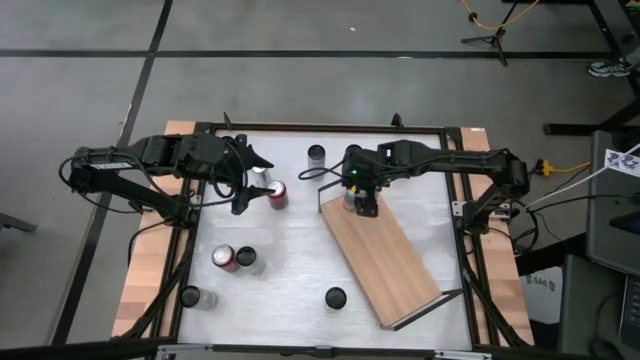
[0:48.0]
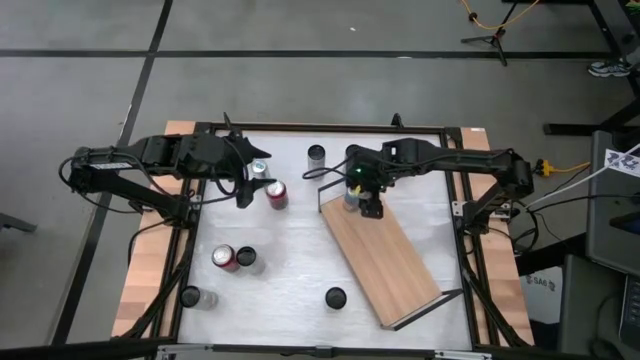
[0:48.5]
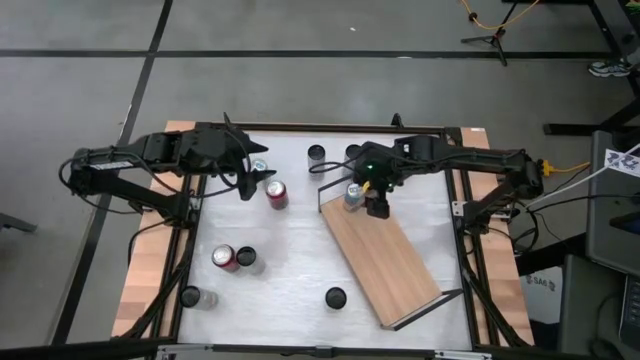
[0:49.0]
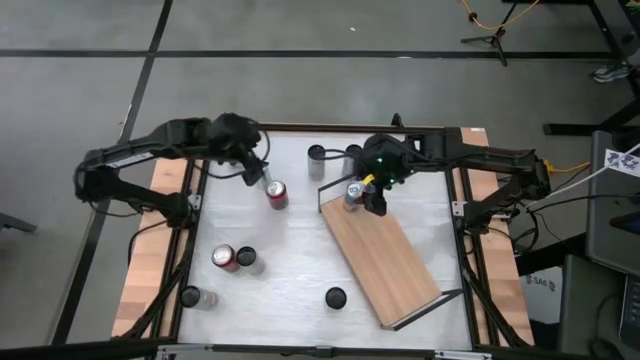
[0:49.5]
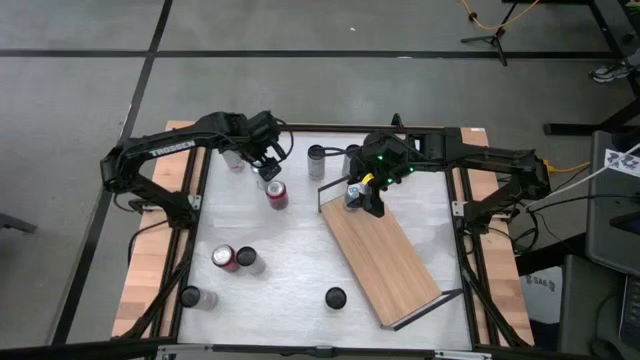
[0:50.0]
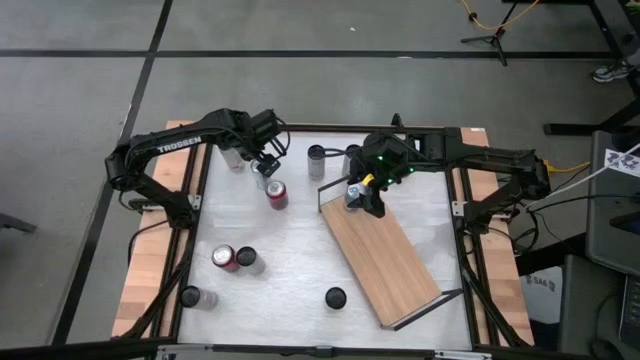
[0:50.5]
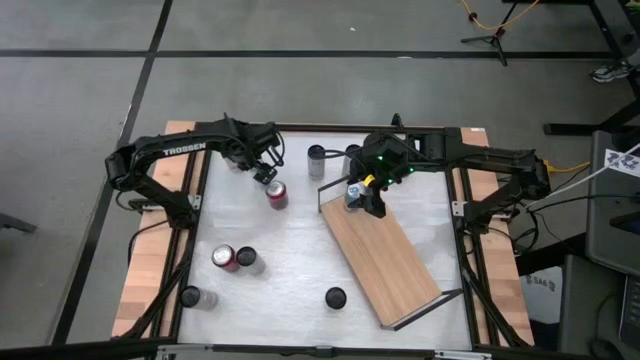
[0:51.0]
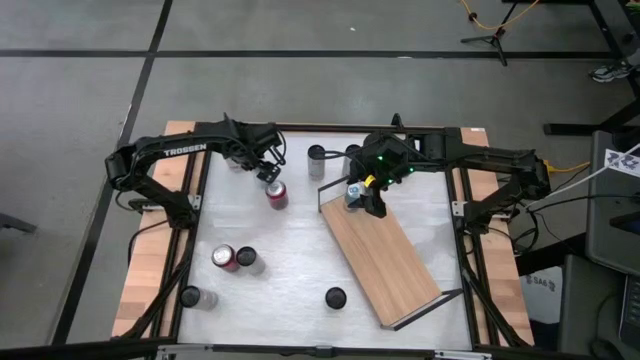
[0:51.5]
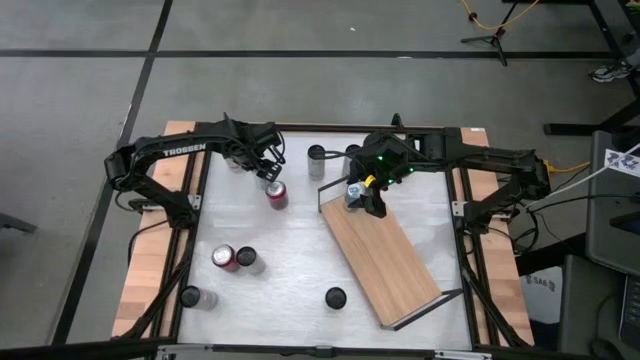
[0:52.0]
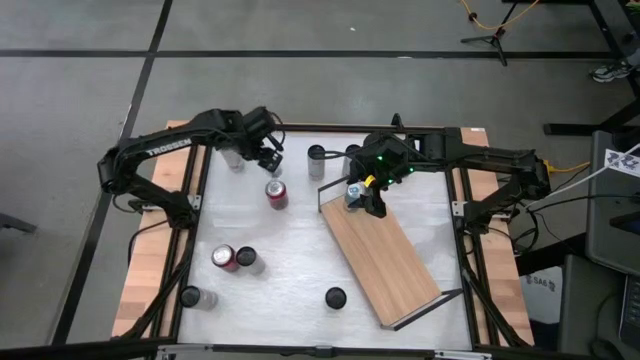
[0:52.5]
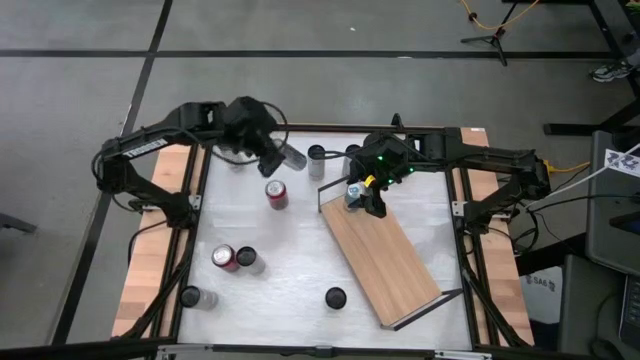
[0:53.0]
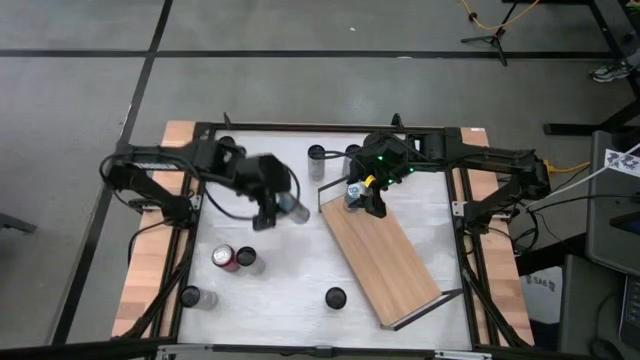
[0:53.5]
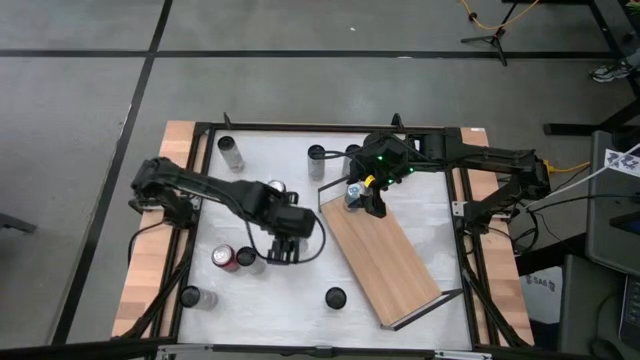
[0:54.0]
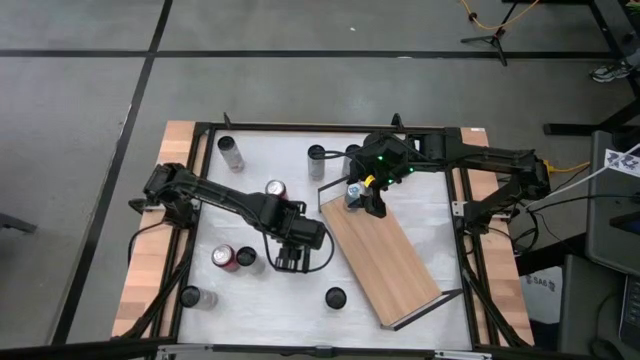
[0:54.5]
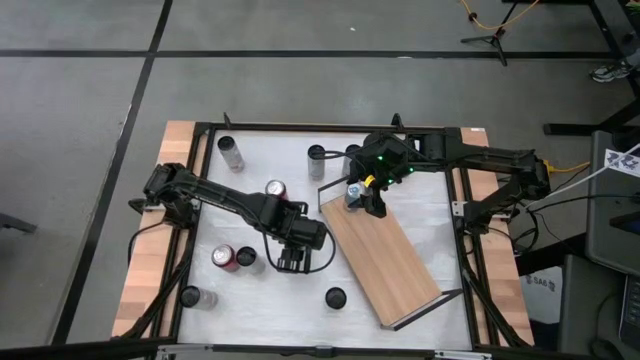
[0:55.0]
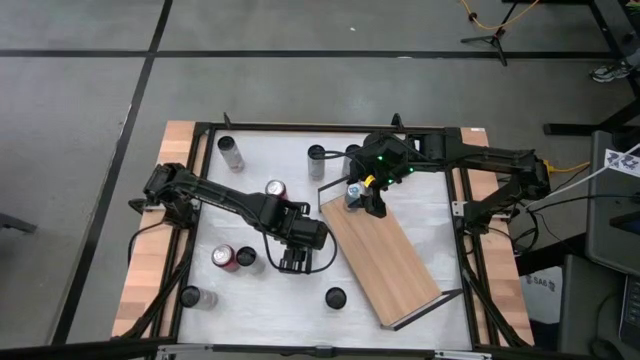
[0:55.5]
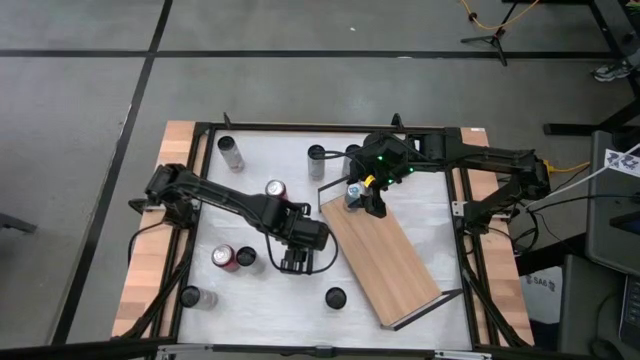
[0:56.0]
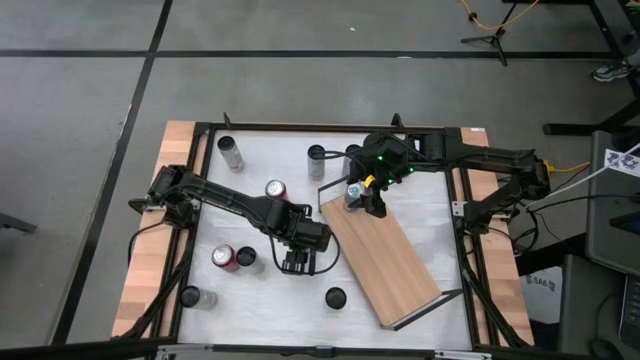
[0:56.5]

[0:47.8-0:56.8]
Task: Place canned beverage on shelf
Put the blue soda can on the shelf aligned with the other blue soda cans

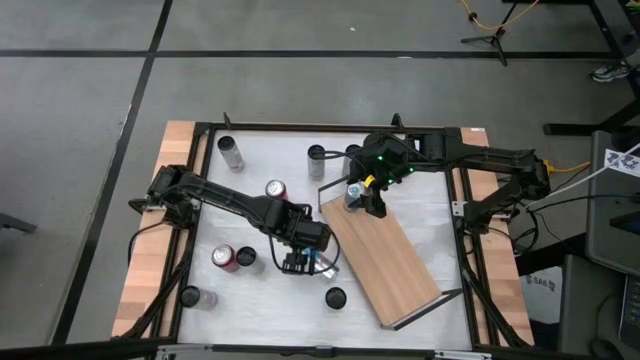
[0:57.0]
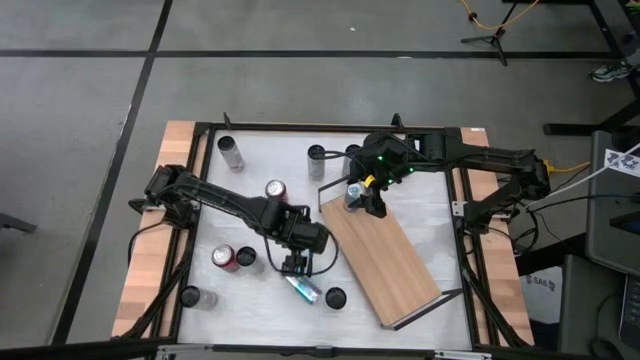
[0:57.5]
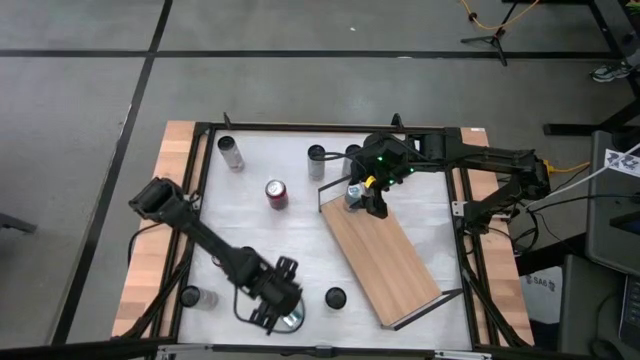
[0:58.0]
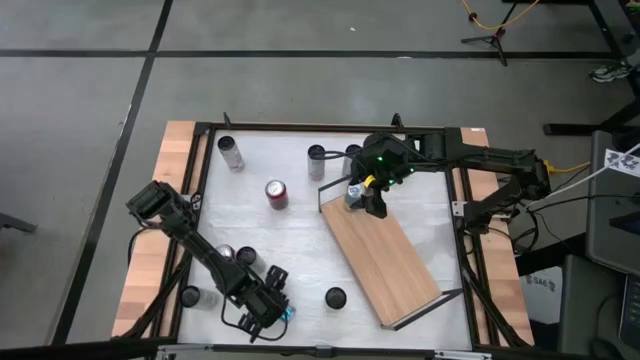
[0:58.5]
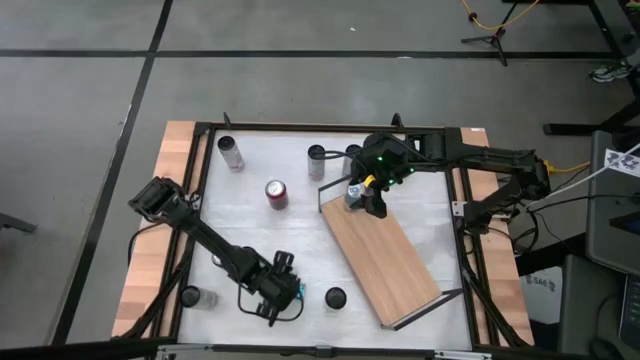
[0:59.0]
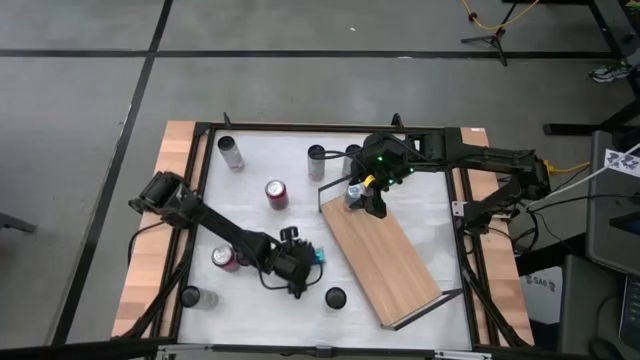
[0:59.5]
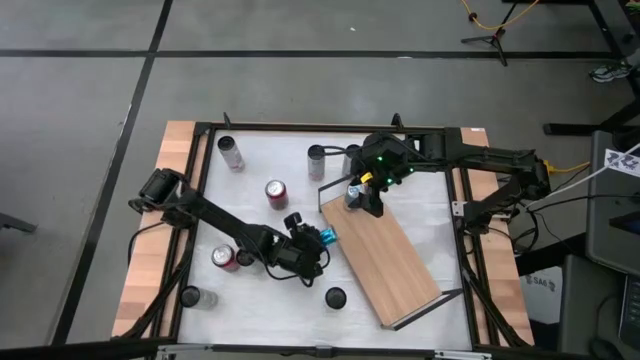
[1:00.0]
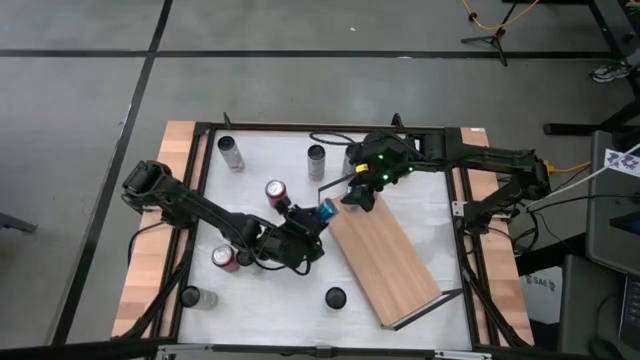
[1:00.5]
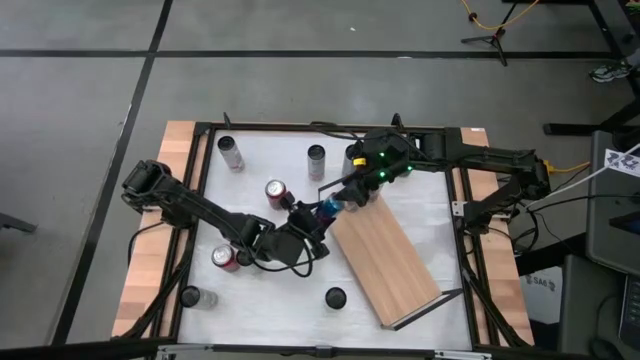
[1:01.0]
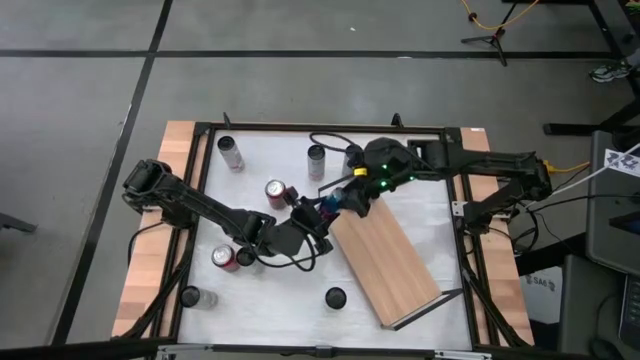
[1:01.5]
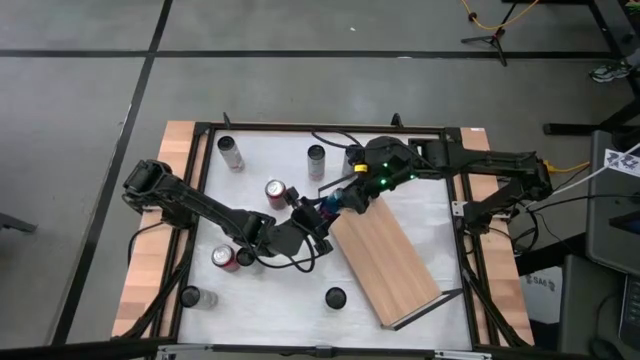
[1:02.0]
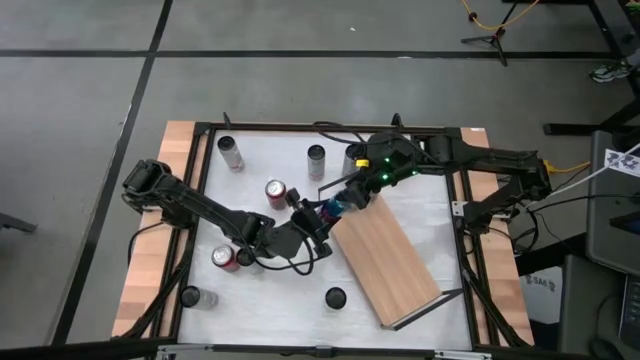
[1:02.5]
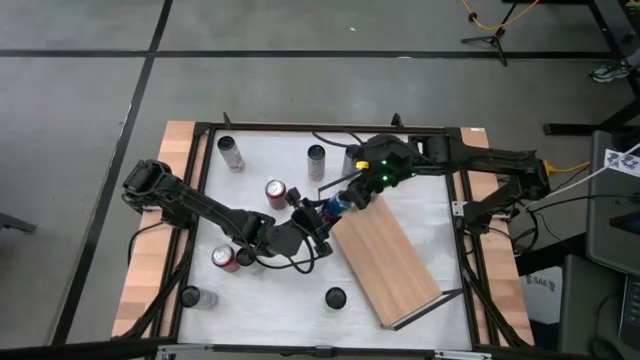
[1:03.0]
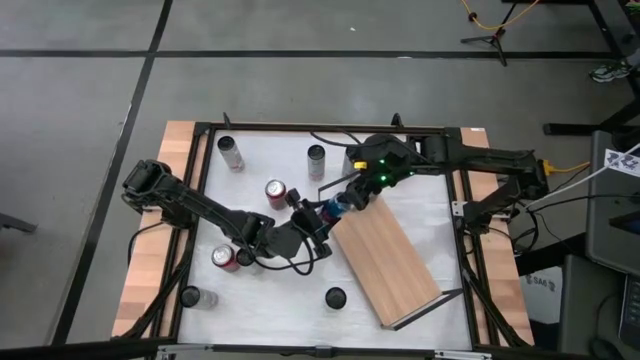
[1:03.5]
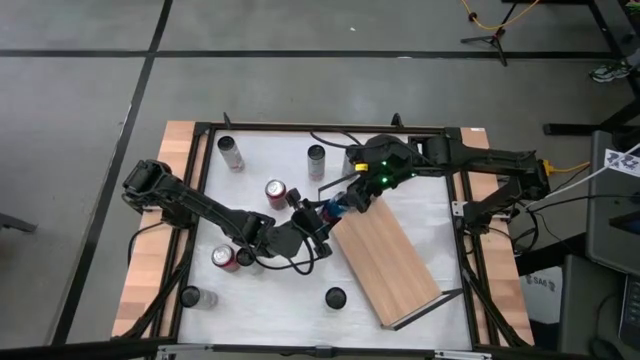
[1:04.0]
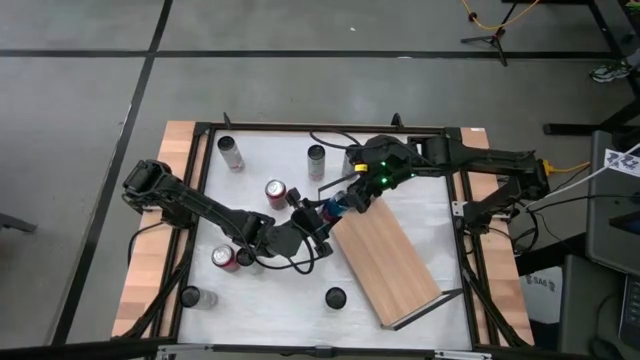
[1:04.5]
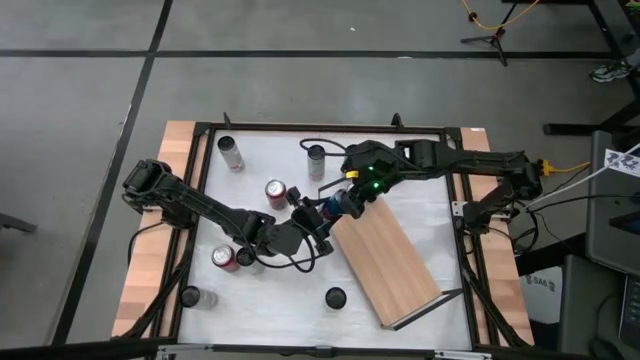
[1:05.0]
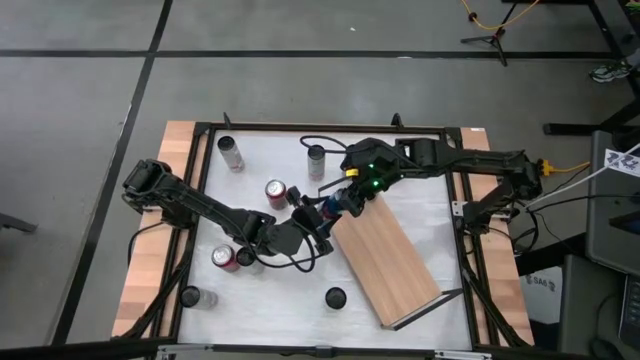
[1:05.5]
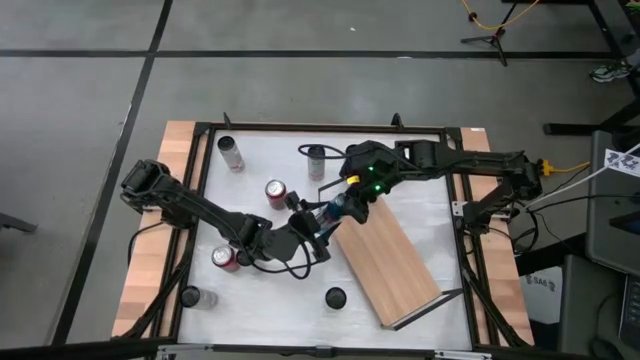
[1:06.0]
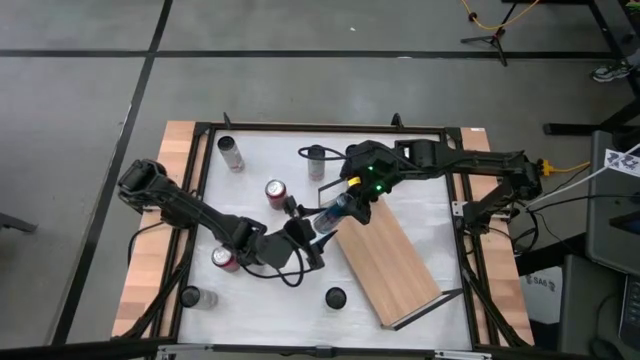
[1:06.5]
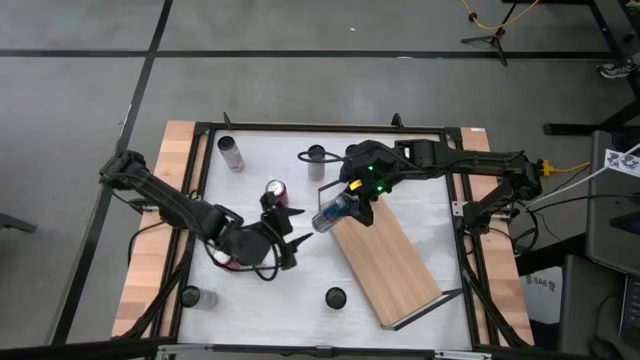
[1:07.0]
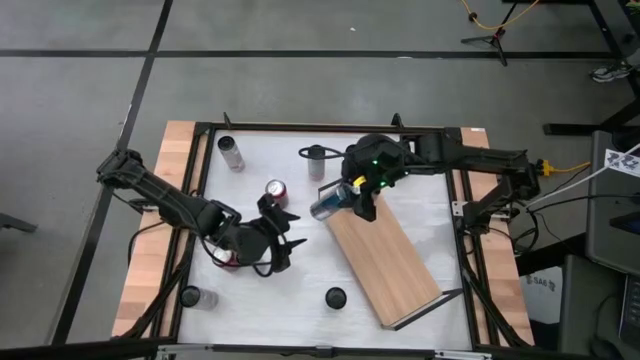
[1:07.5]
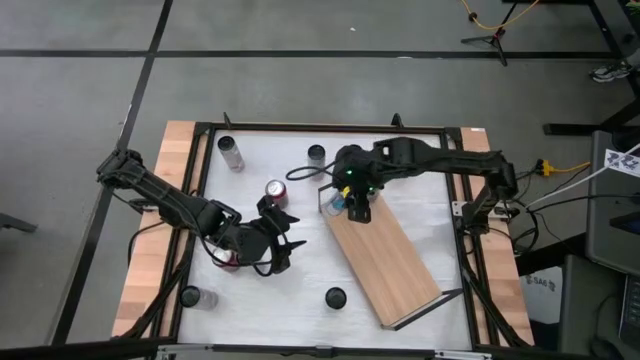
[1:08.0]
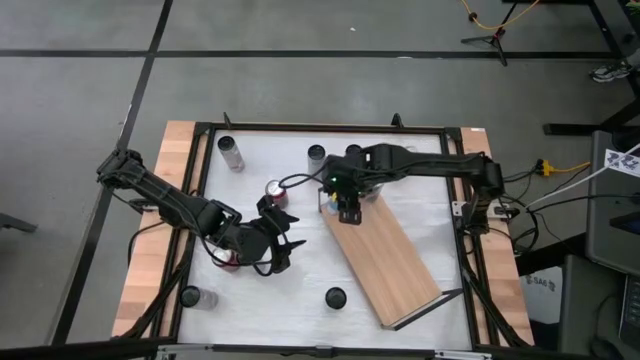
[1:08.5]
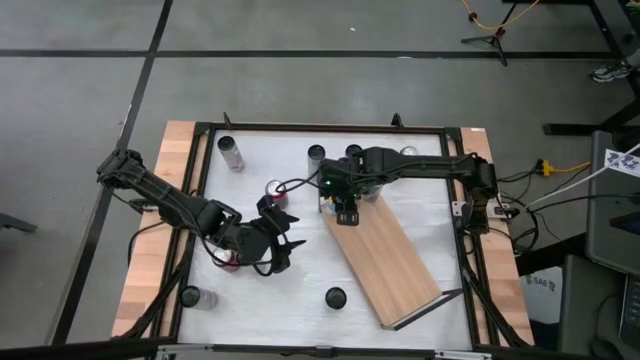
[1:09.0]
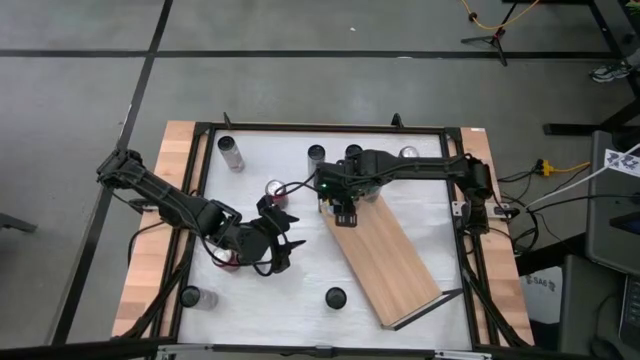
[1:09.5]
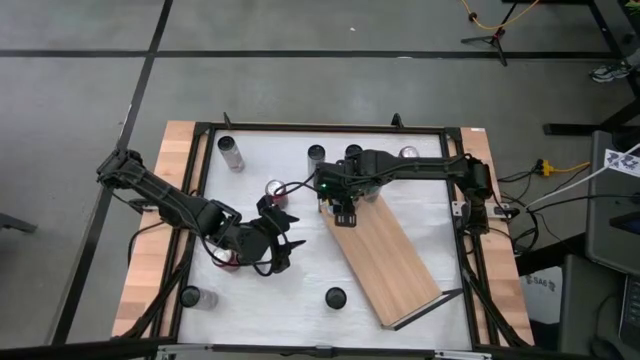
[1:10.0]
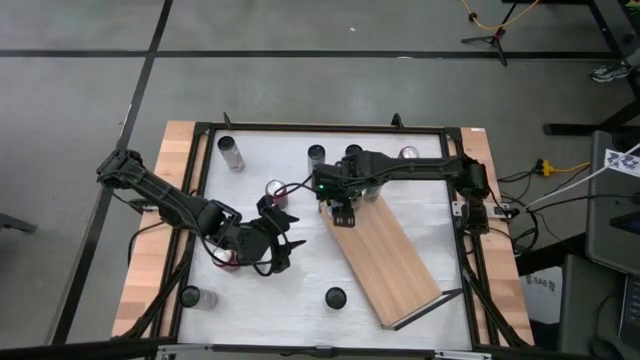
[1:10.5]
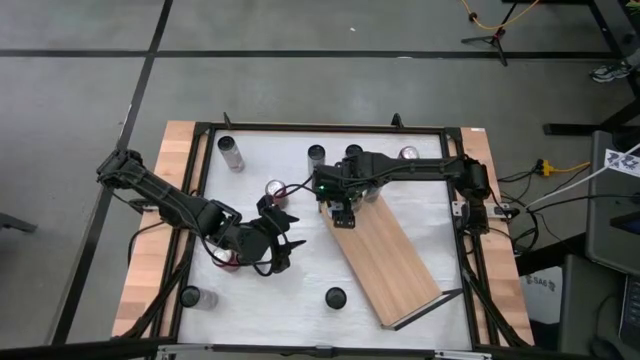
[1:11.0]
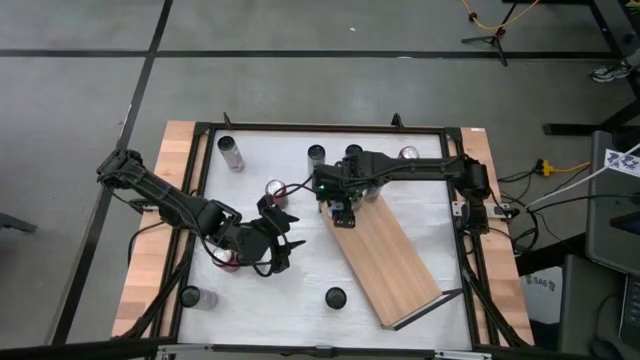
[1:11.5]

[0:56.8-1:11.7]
Put the blue soda can on the shelf aligned with the other blue soda cans
